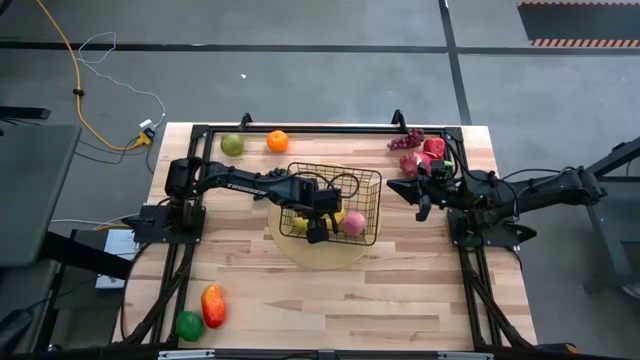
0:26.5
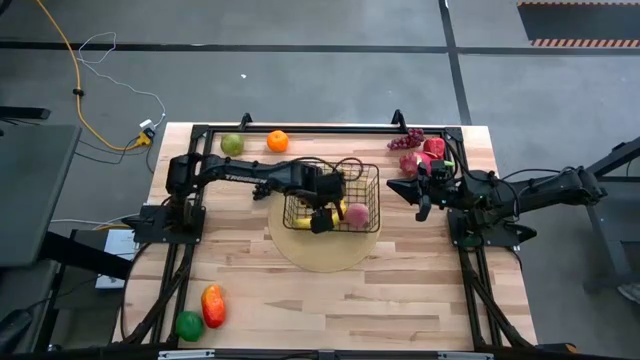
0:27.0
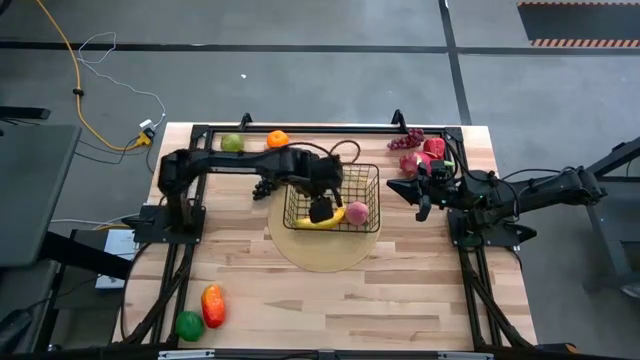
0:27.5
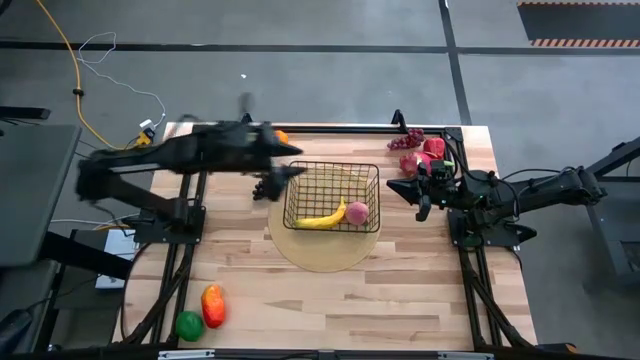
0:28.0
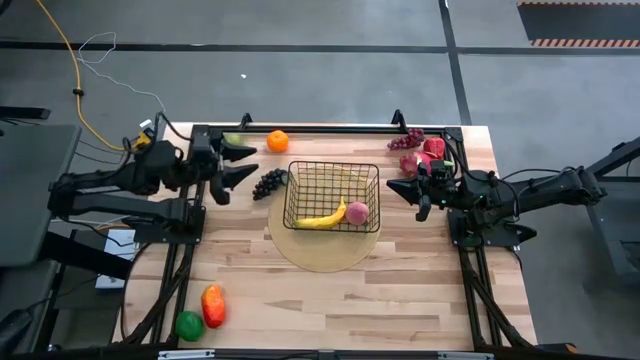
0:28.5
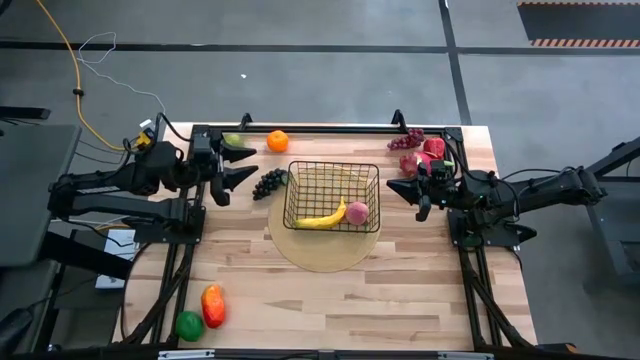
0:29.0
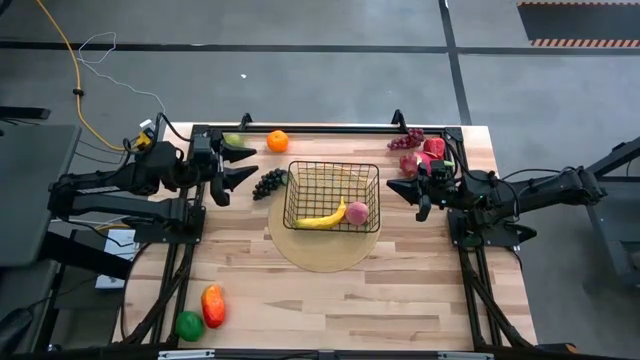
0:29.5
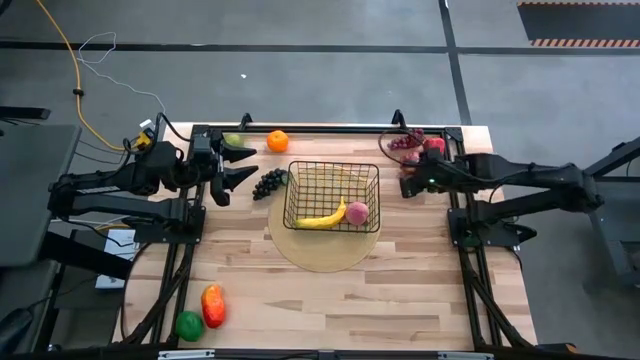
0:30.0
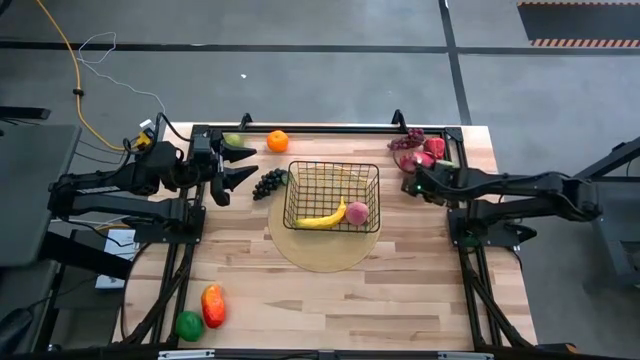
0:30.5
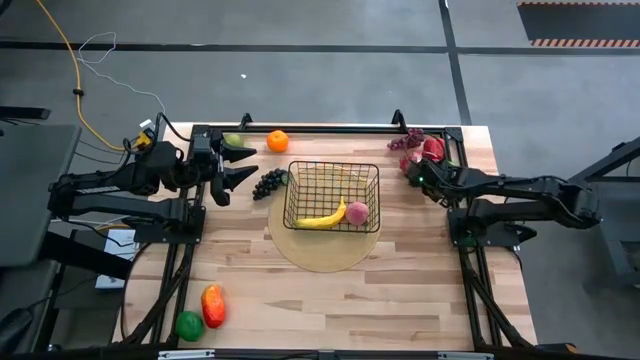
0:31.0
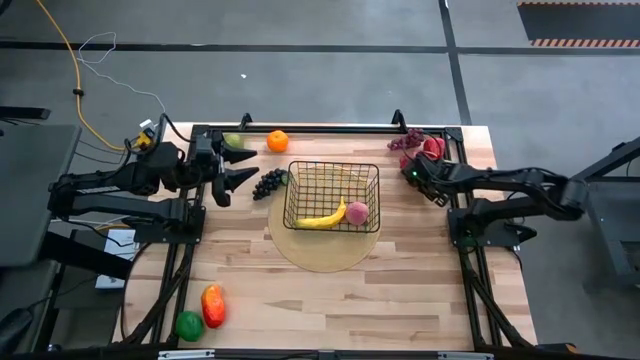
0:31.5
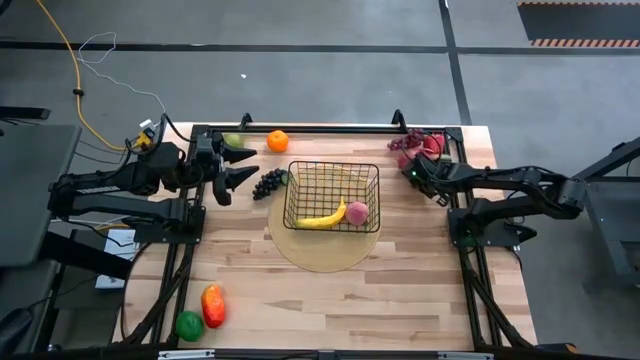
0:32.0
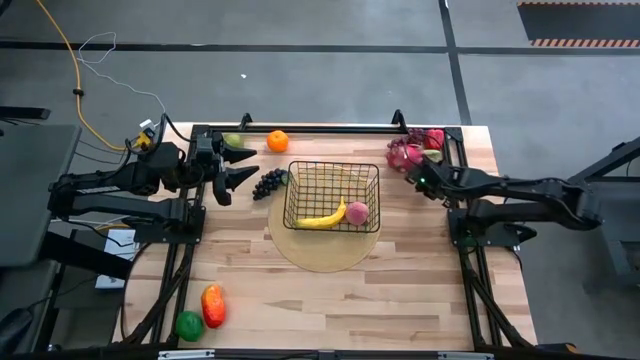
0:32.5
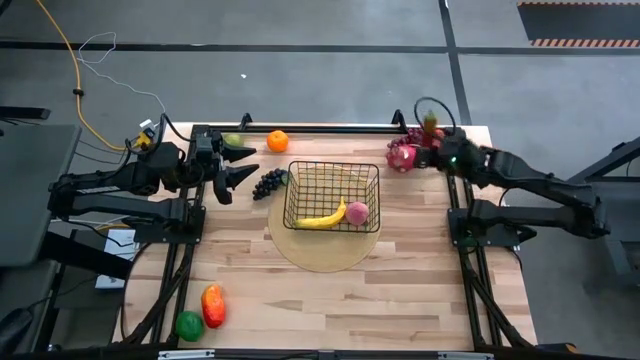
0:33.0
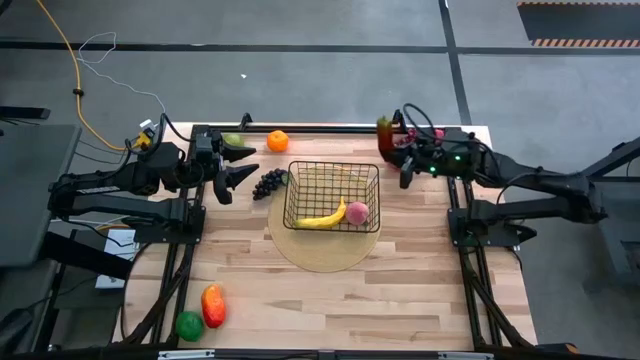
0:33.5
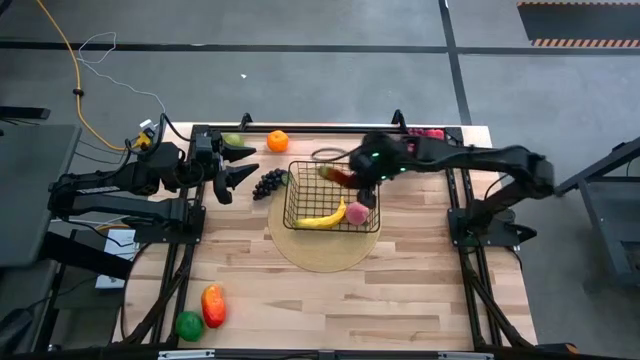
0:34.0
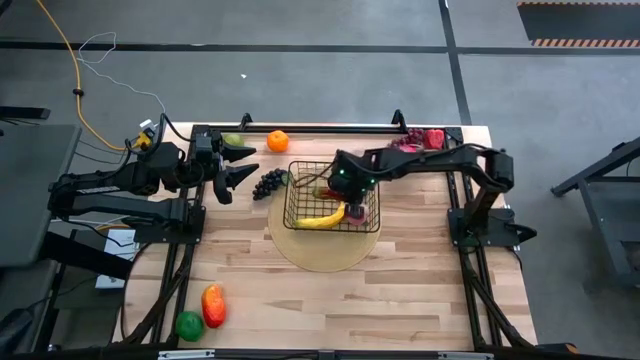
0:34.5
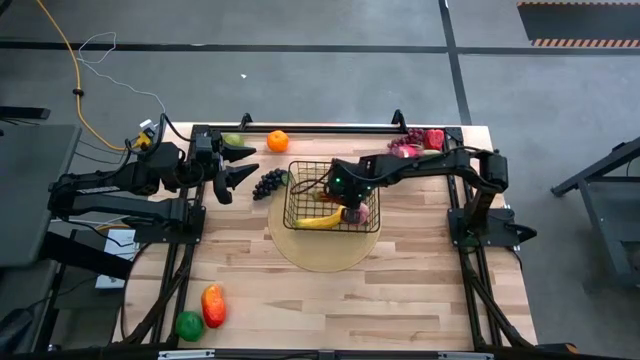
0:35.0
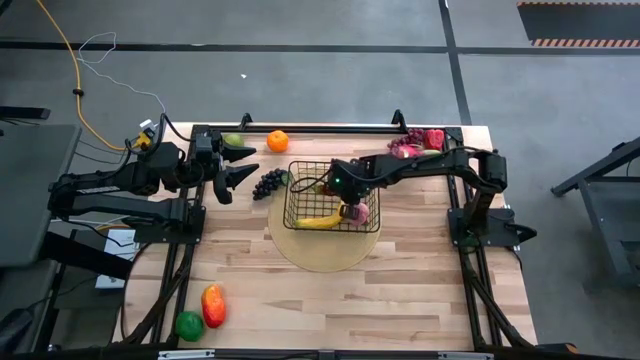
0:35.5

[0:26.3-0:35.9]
Task: Build produce basket
Put the fresno pepper into the wire basket

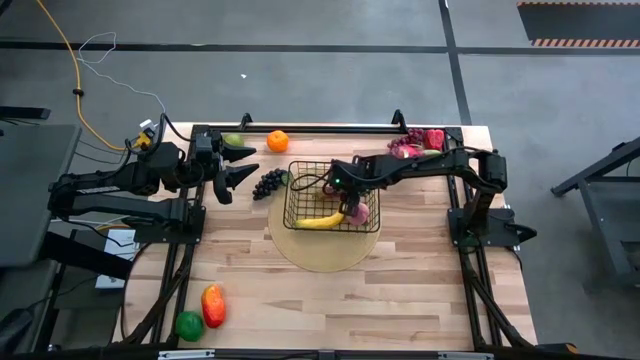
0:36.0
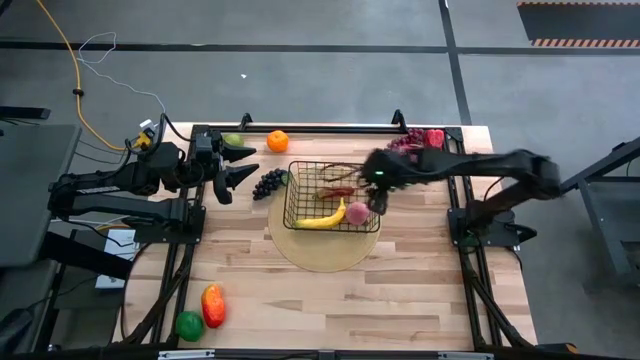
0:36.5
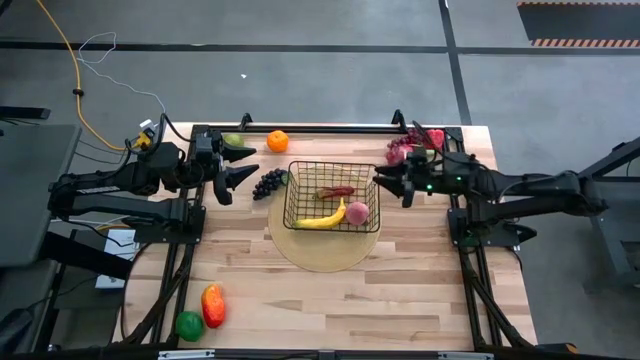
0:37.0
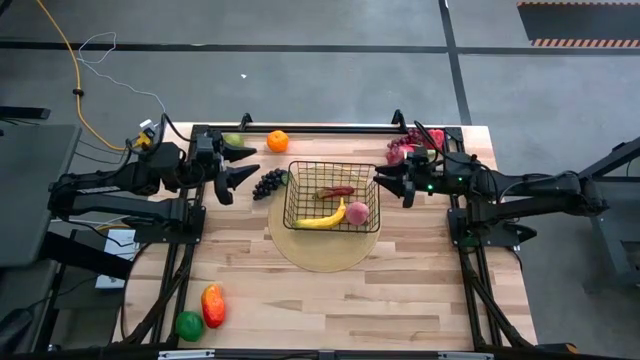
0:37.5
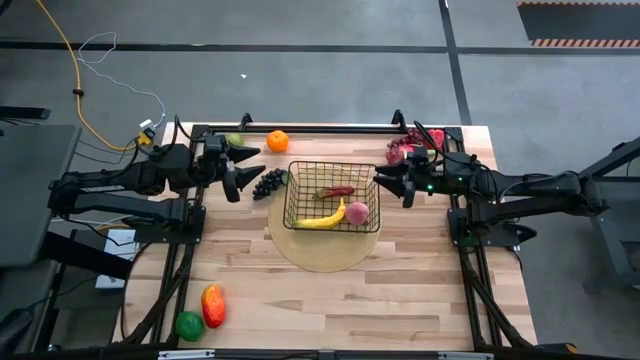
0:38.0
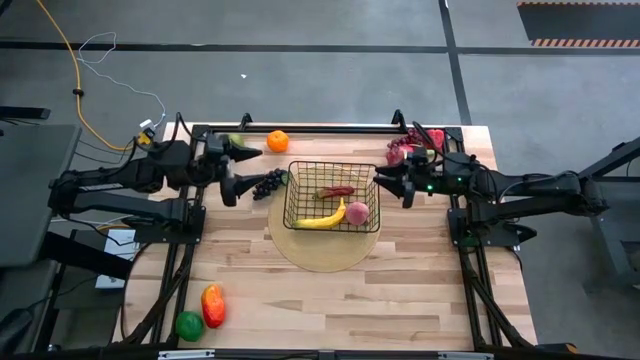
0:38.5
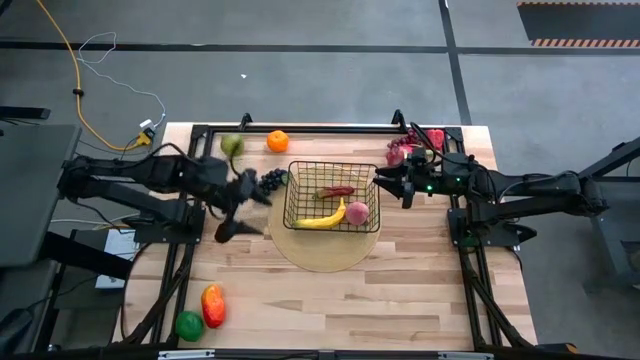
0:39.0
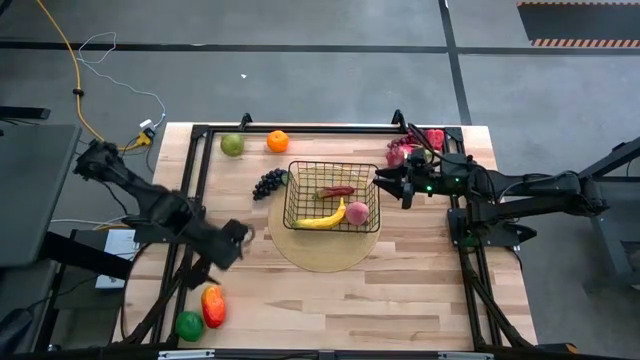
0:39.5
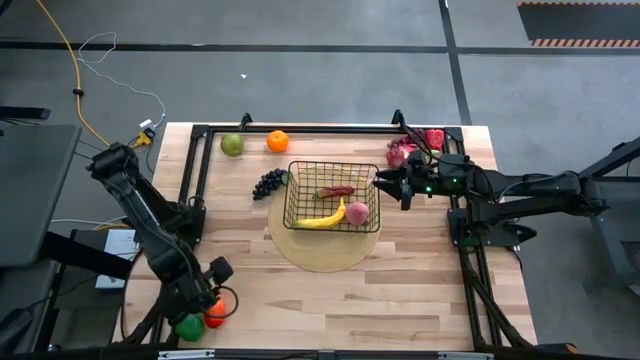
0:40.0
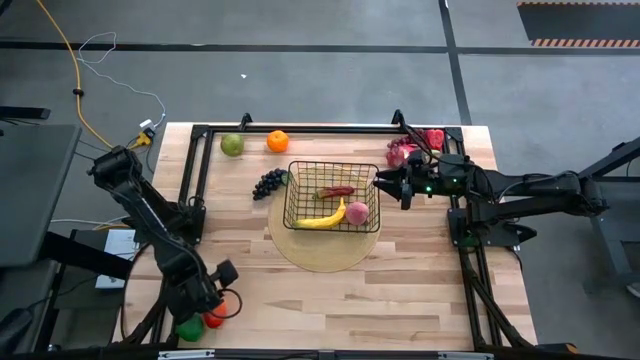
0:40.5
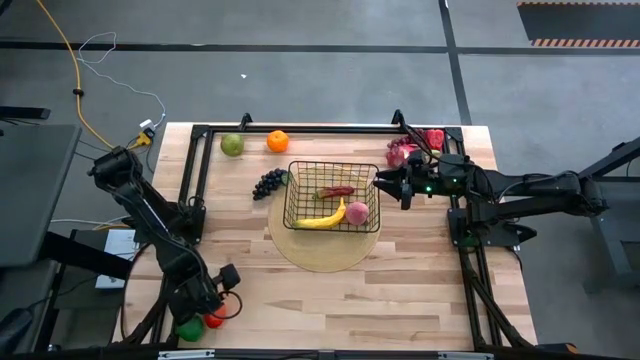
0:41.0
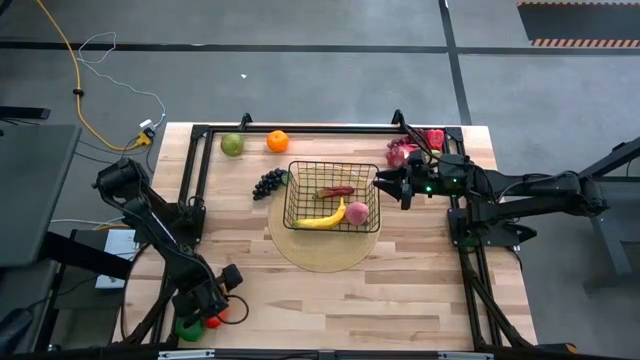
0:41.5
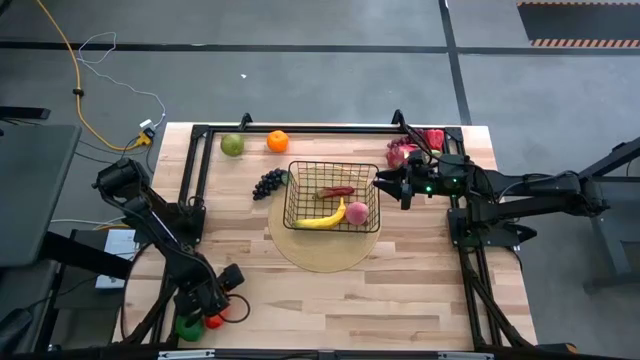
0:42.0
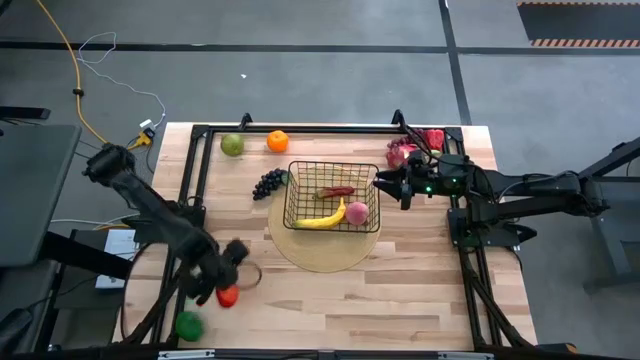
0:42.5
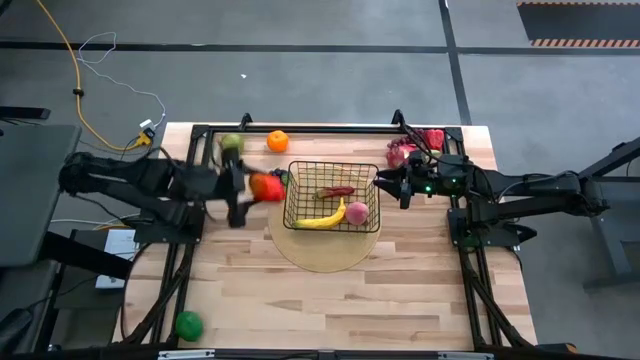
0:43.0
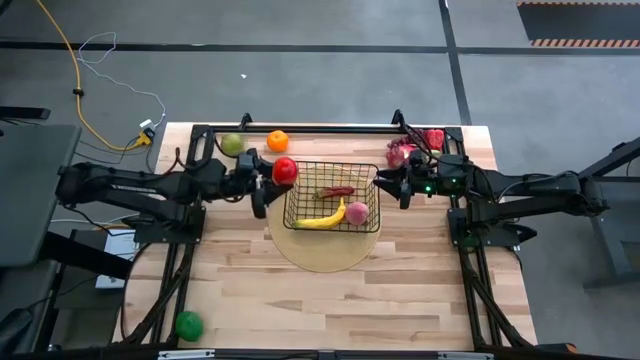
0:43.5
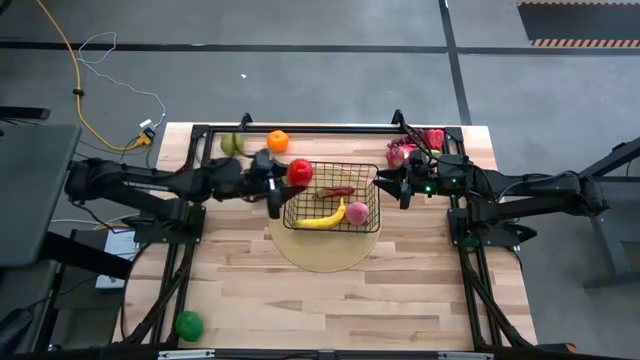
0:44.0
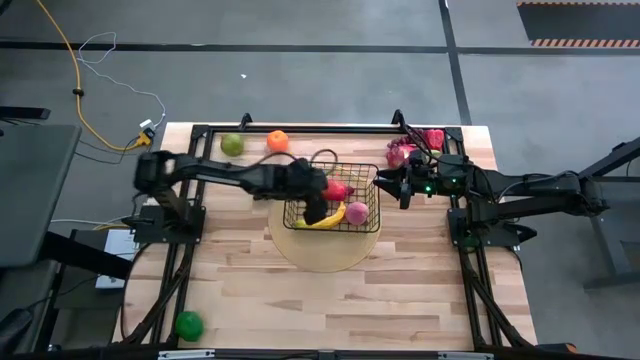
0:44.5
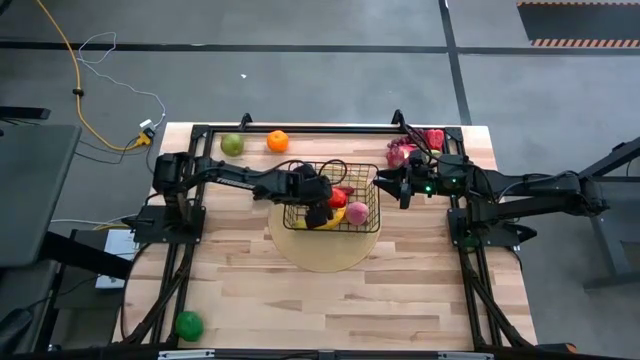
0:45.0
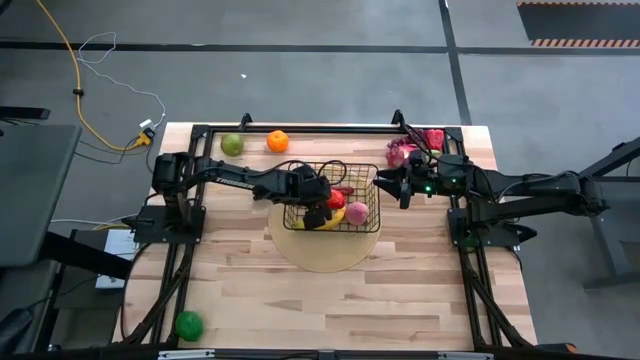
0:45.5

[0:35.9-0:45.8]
Put the red mango into the wire basket

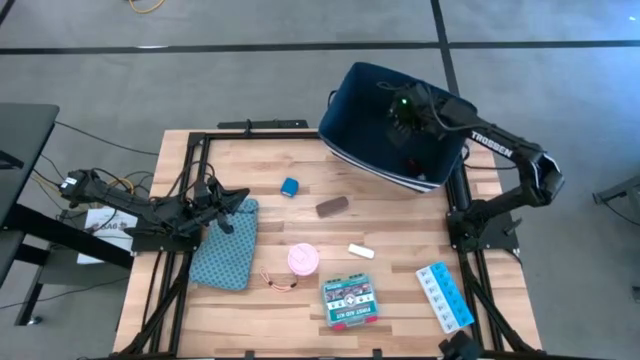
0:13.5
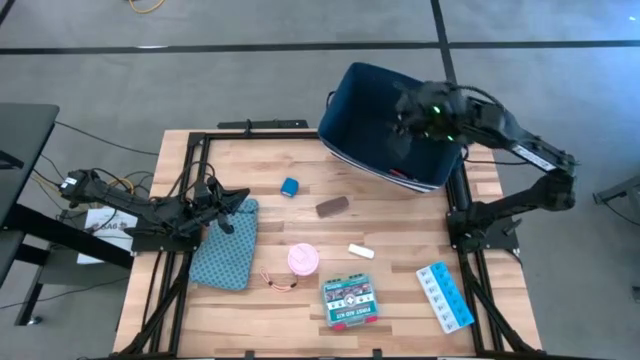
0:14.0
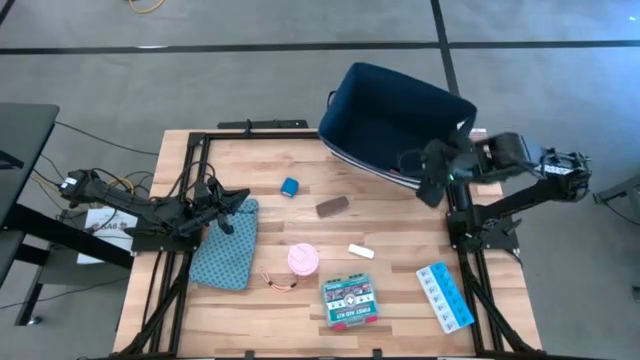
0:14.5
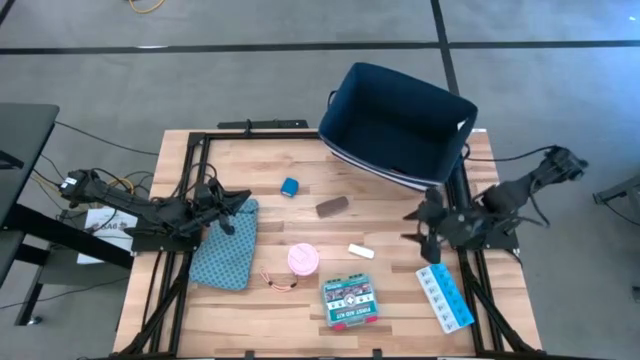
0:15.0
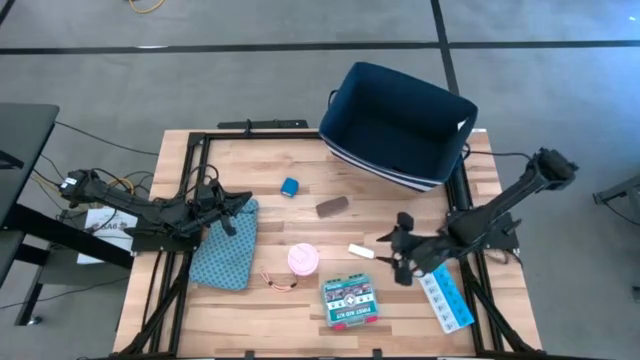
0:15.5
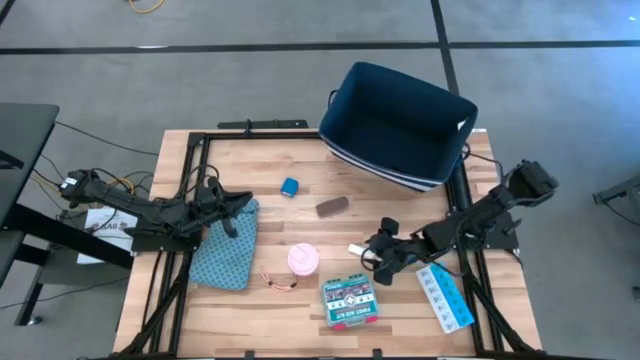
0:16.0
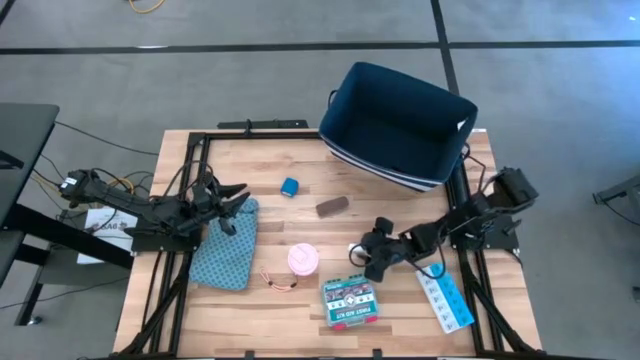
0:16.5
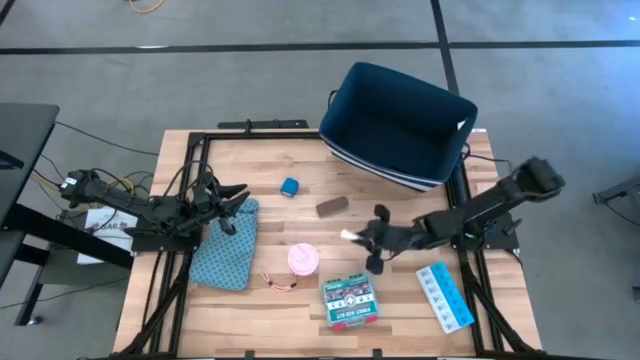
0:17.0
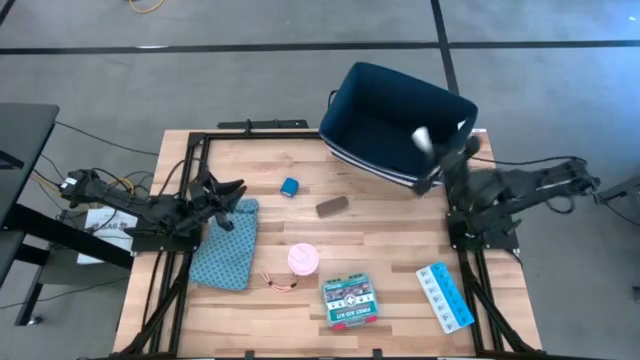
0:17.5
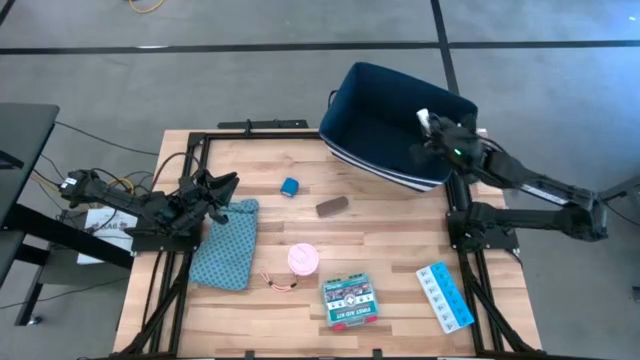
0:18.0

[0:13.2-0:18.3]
Task: Pick & place medical supplies in basket/bin
Put the white rolled gauze into the blue organizer bin
